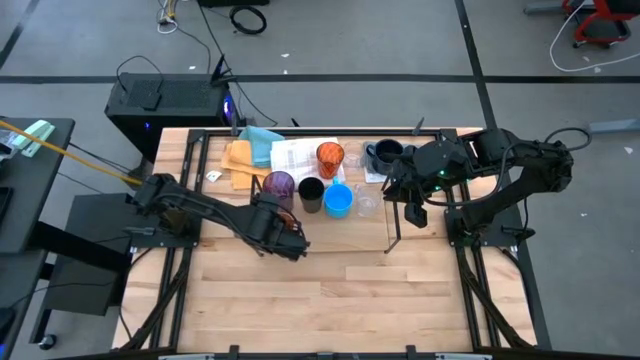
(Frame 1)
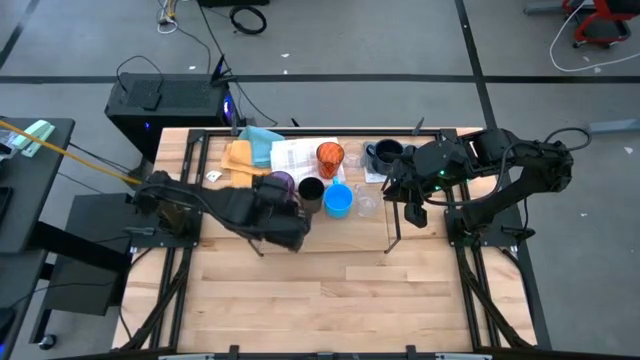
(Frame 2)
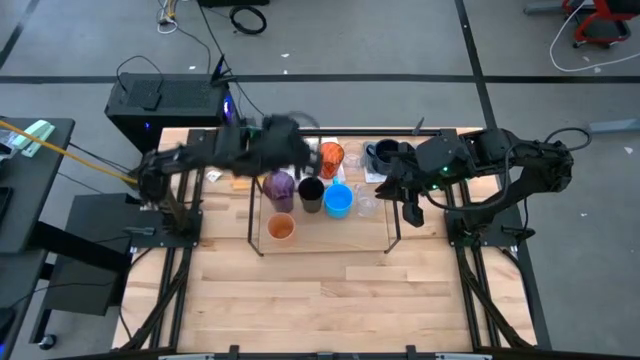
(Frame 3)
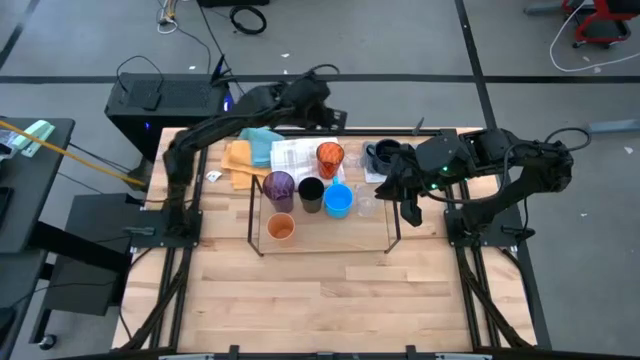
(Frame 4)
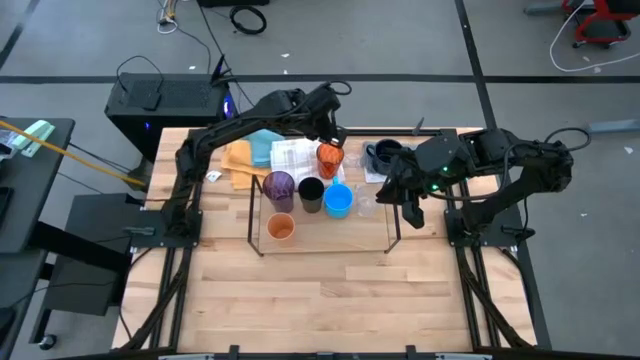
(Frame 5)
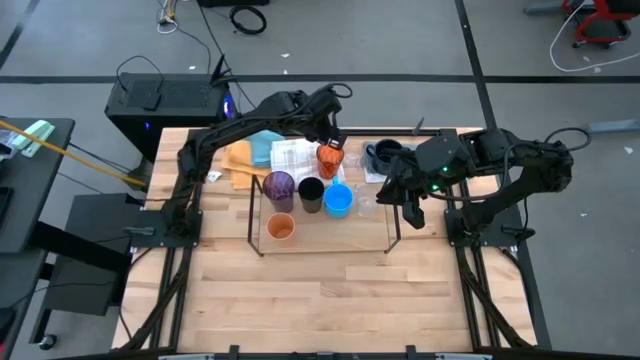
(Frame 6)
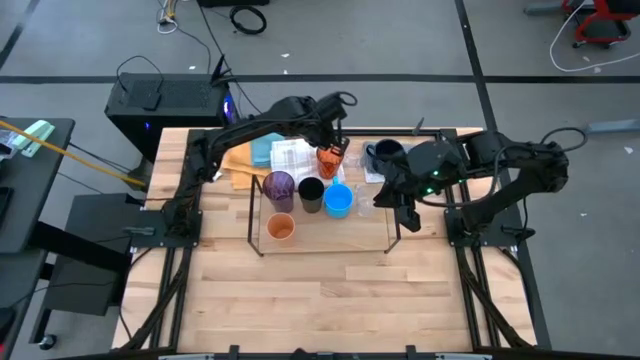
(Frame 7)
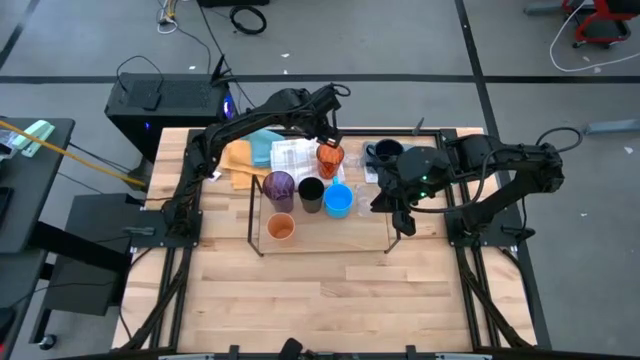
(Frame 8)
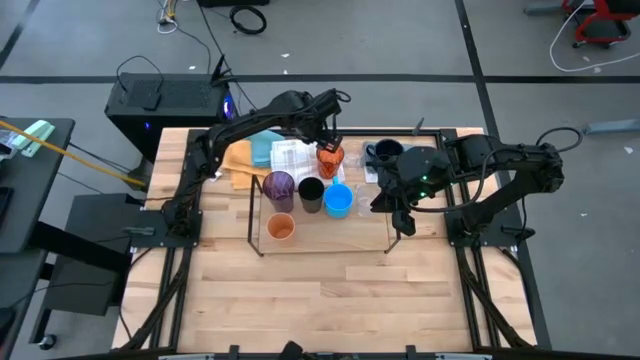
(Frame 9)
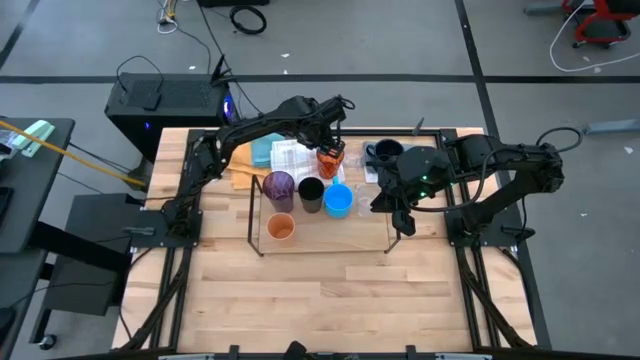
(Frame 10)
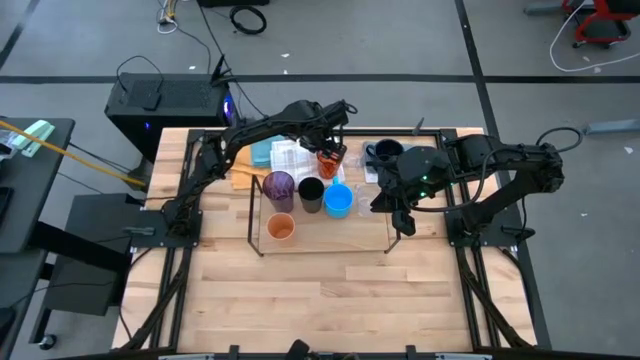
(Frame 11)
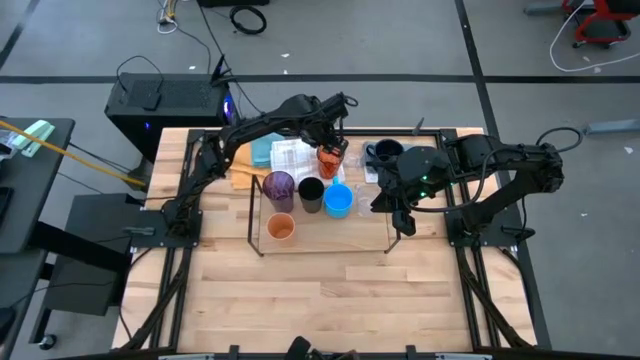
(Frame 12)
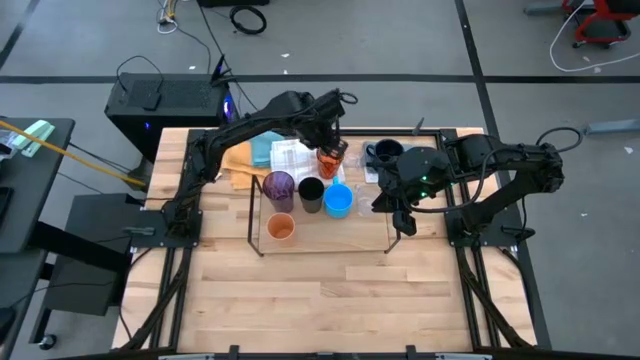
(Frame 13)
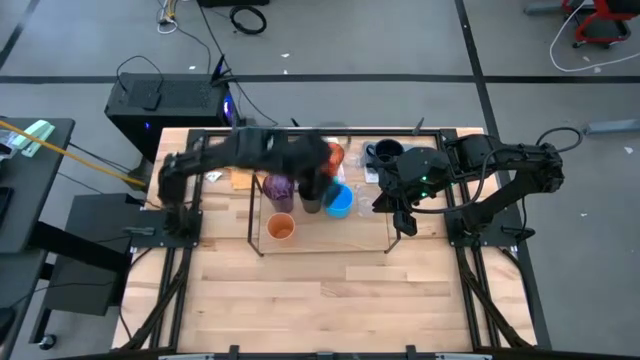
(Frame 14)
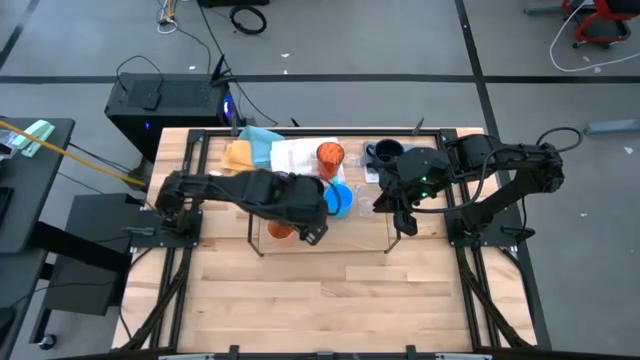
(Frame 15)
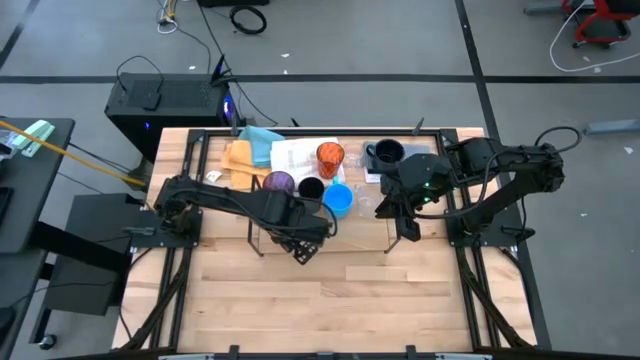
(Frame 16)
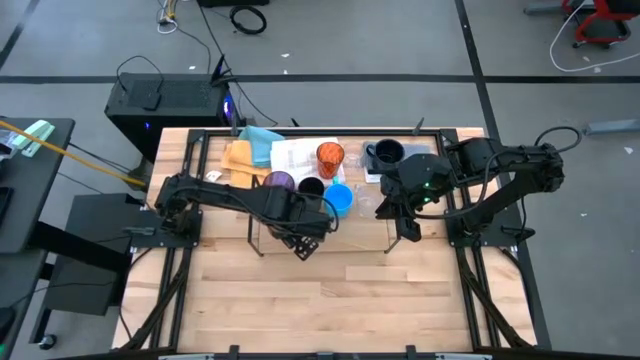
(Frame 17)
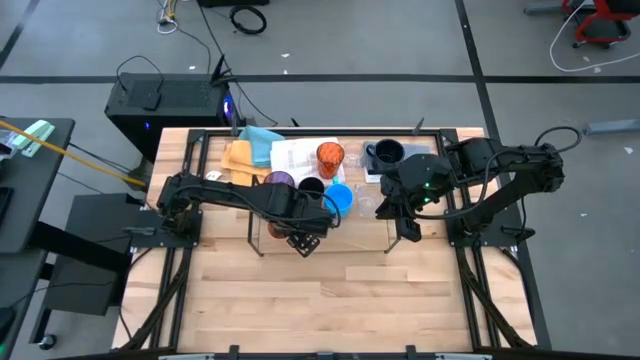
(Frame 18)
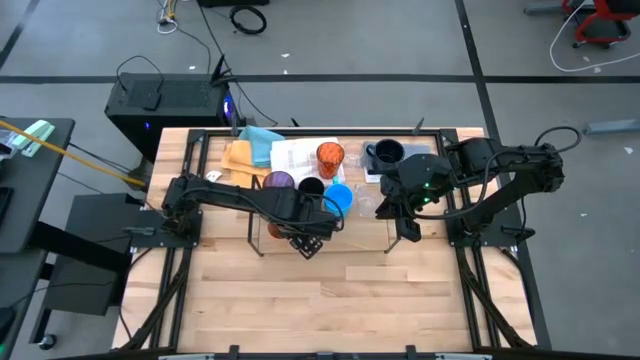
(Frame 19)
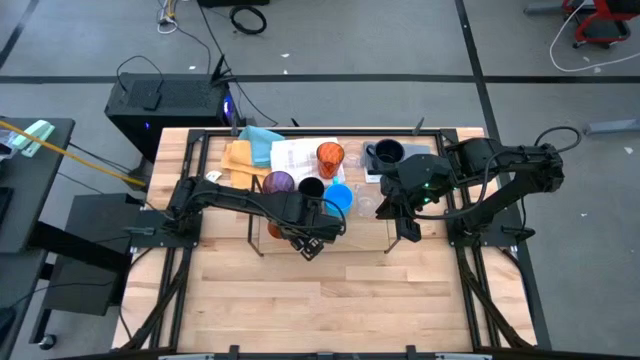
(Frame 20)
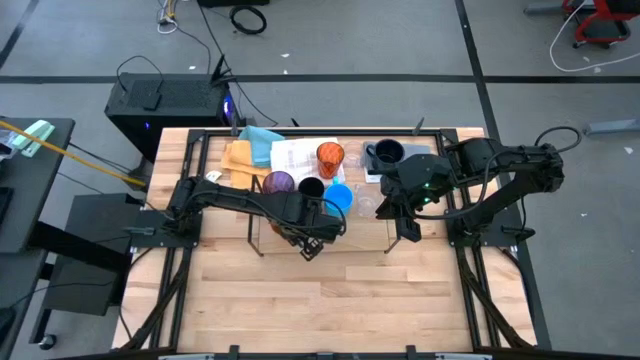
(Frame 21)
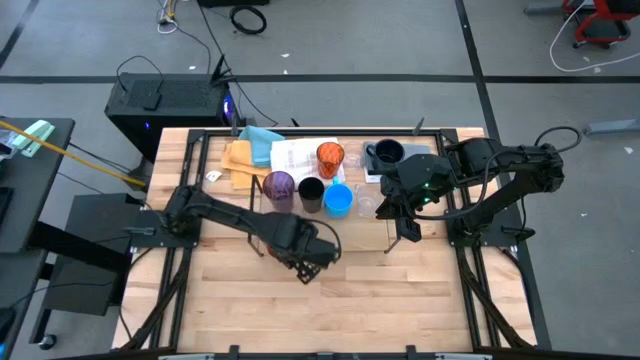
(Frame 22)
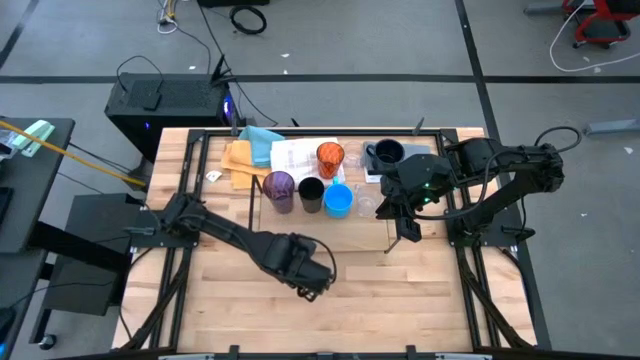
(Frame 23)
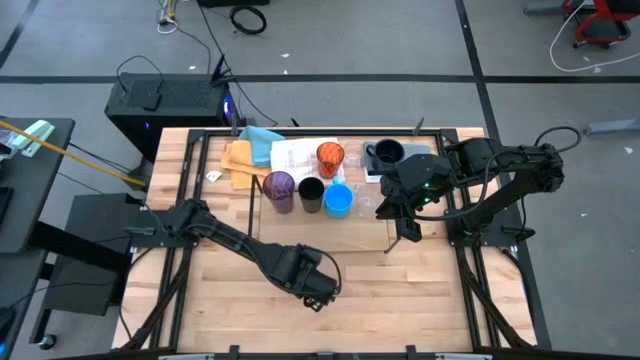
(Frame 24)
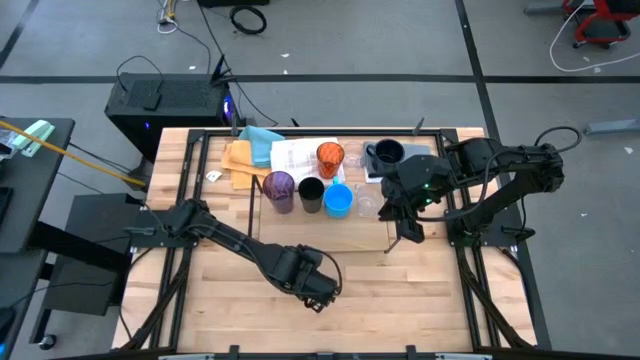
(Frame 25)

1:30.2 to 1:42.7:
Task: Stack small to large cups/mugs on shelf
Remove the orange cup from the shelf

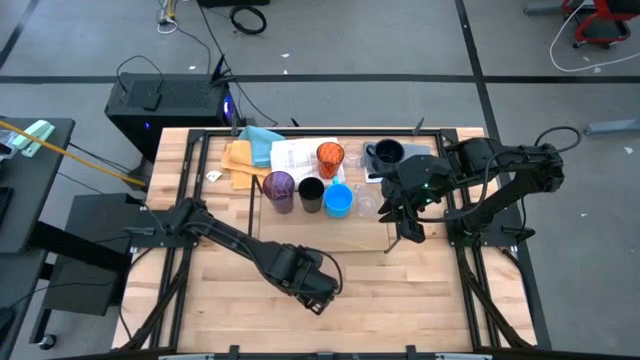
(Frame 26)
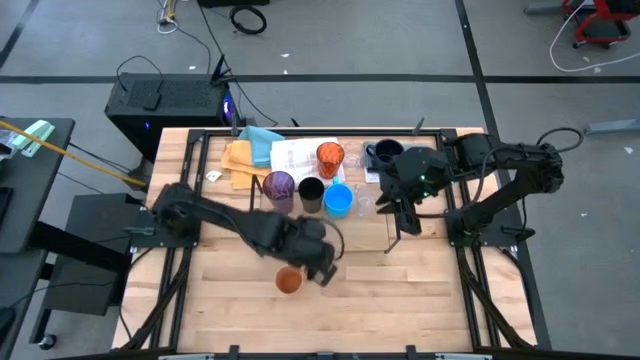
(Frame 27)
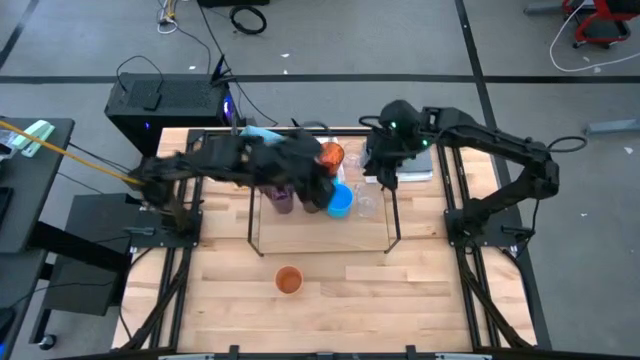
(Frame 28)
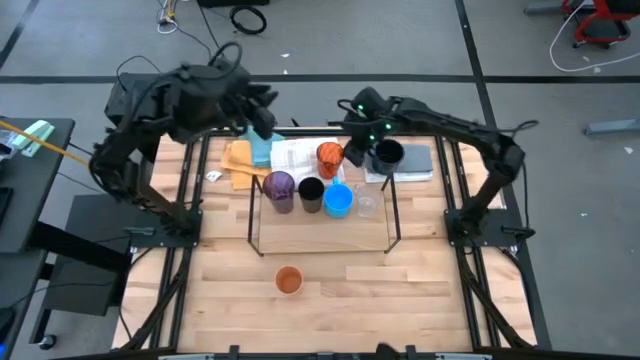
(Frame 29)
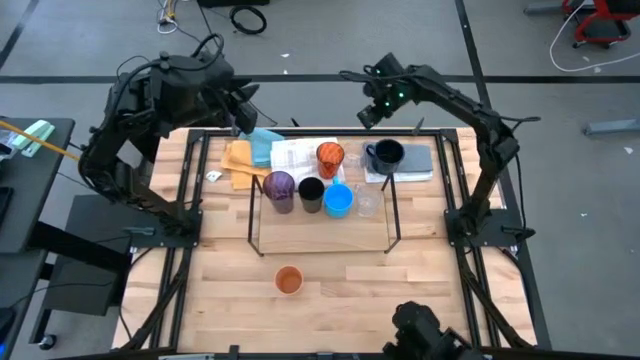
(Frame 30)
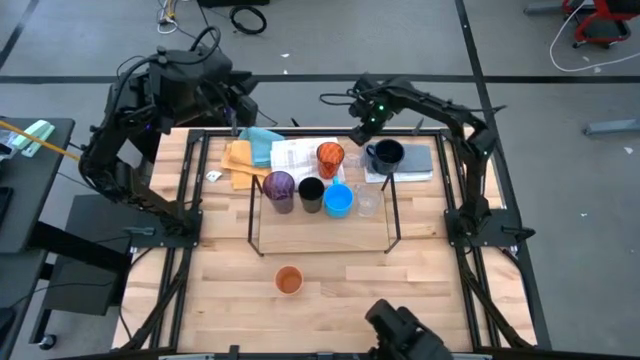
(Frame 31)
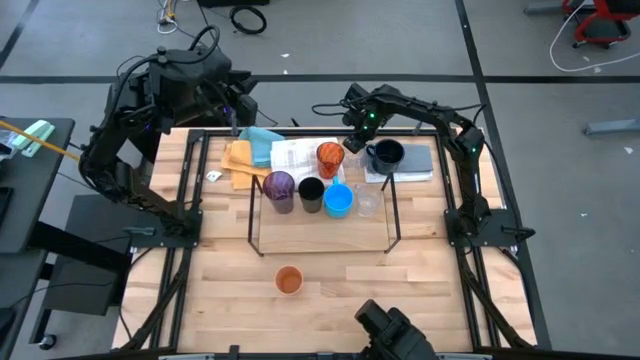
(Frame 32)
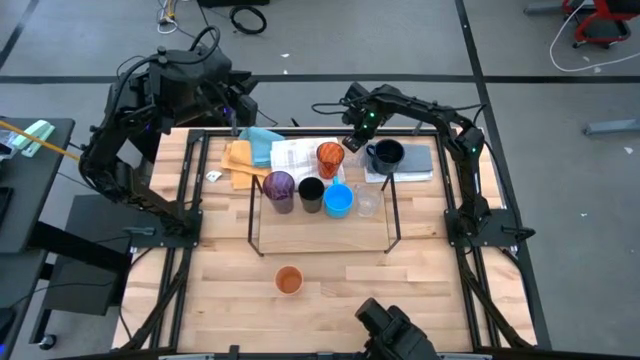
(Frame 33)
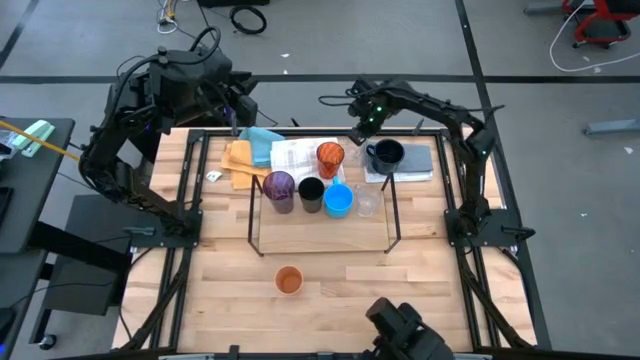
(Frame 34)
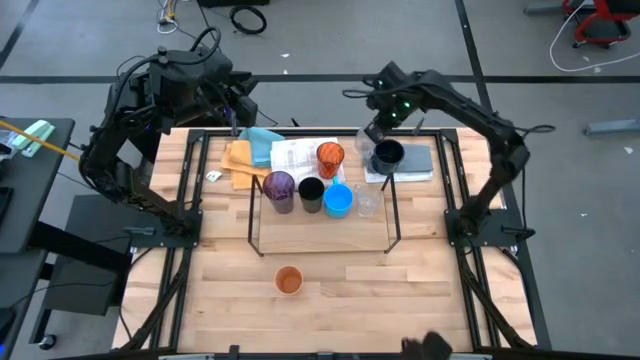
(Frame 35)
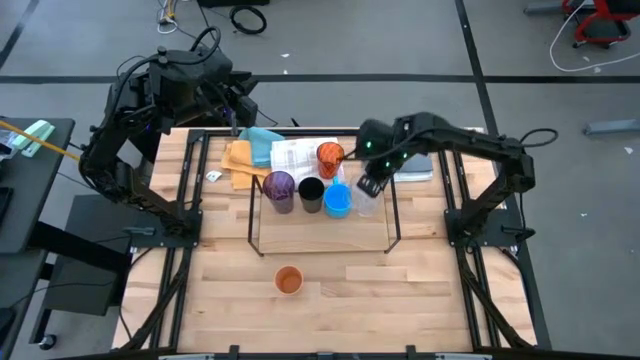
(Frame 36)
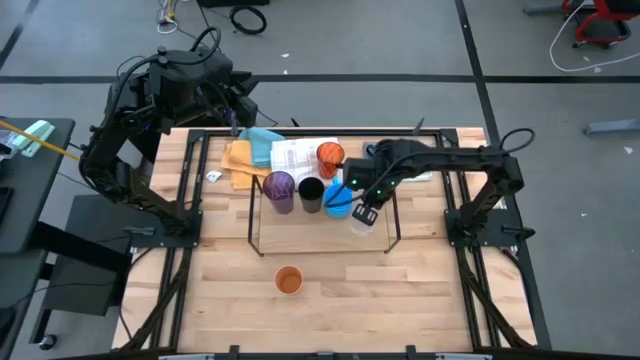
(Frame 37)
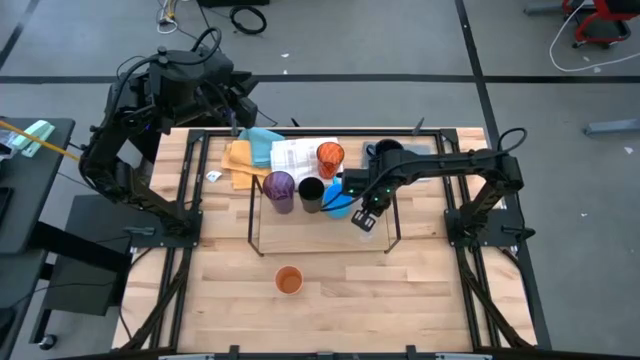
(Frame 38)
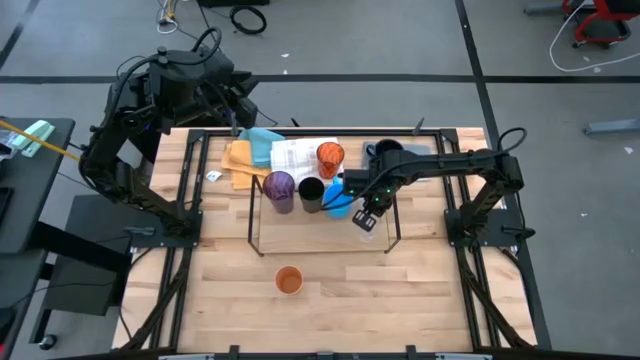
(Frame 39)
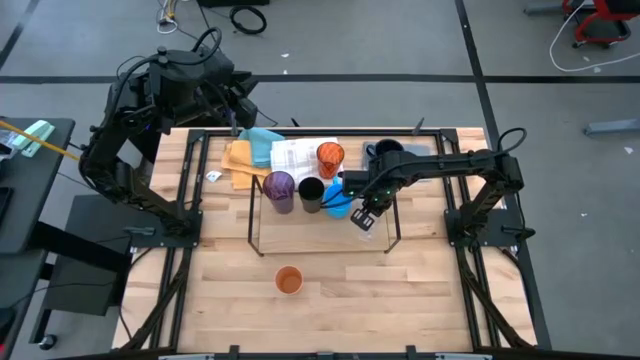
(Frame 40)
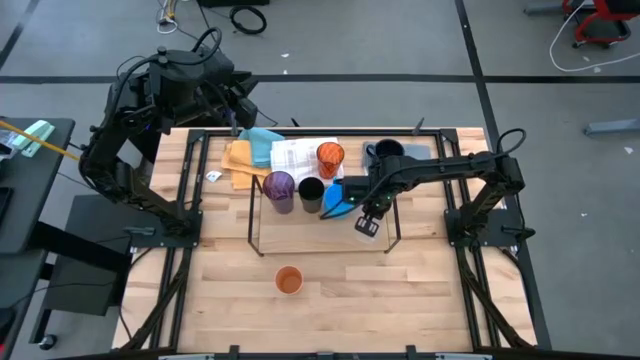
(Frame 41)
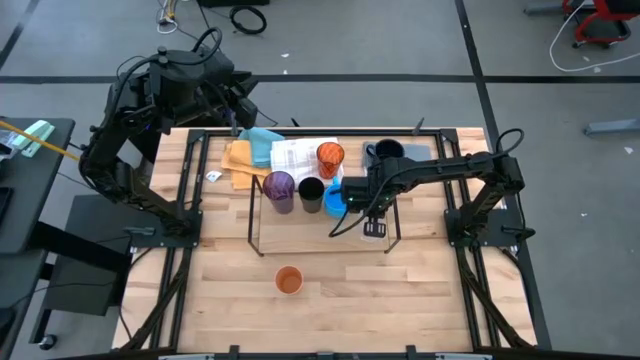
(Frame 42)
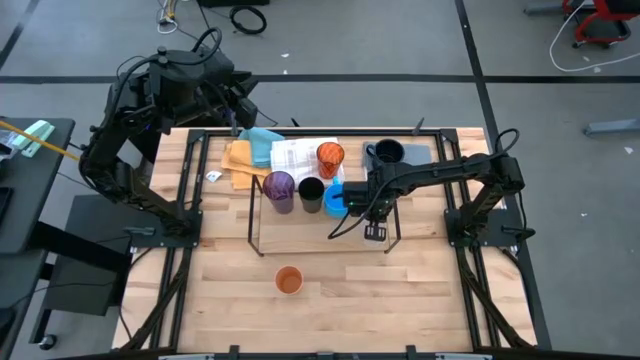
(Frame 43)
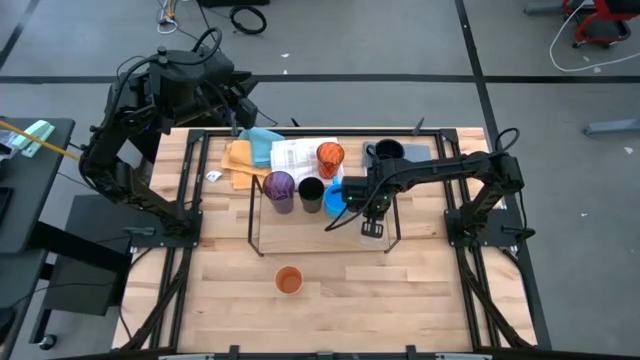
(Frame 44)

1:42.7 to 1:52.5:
Put the transparent mug on the shelf
